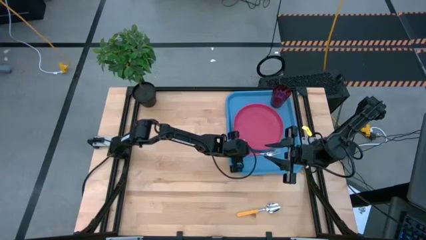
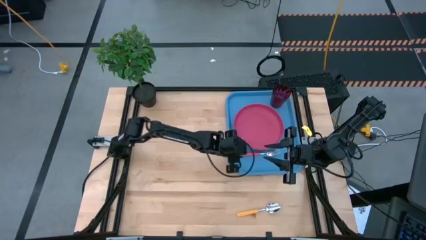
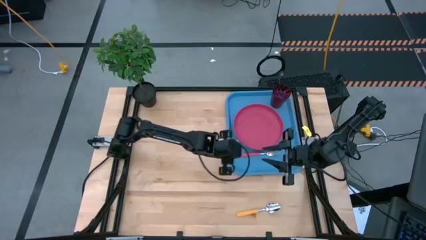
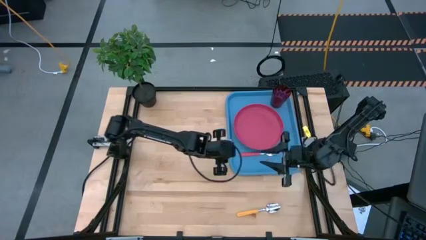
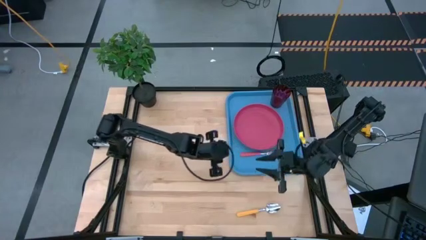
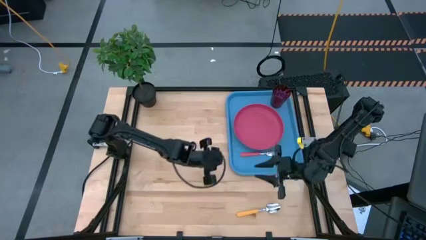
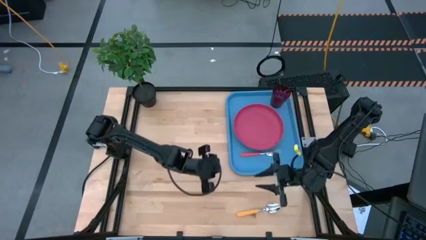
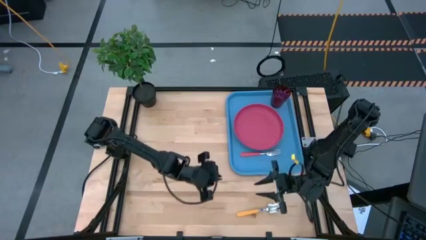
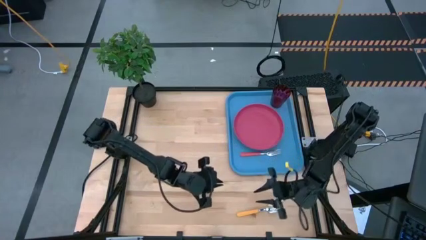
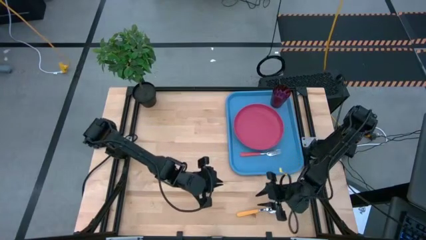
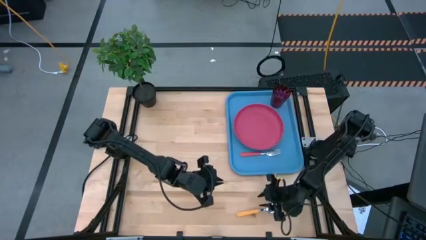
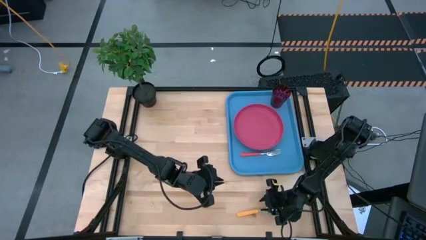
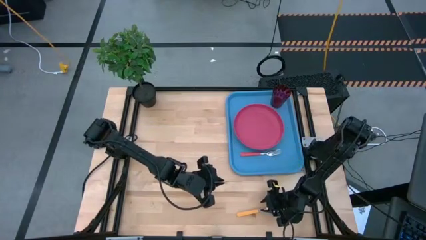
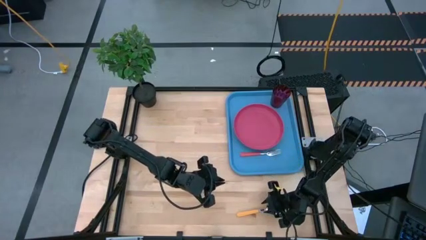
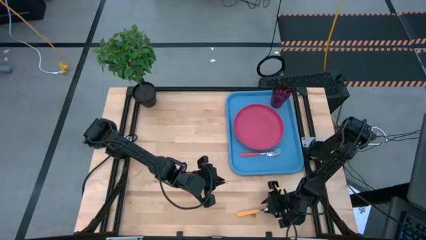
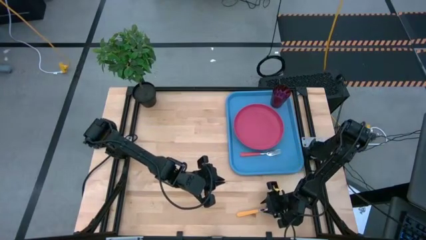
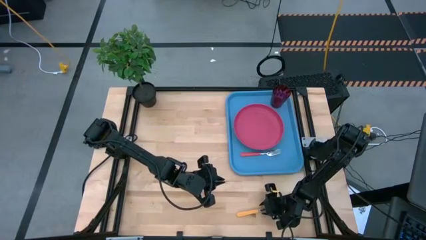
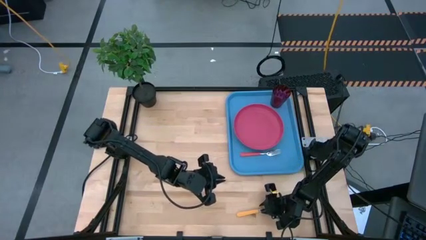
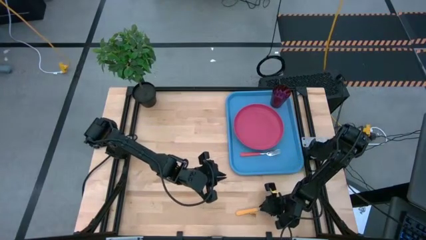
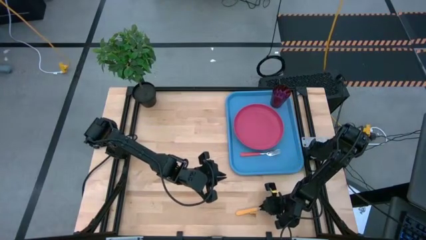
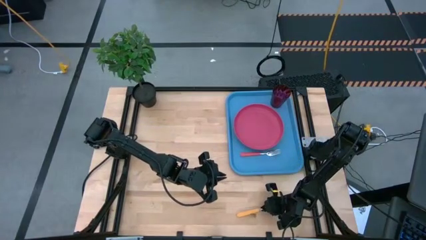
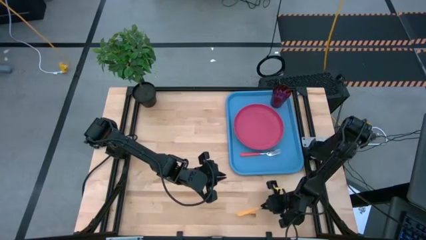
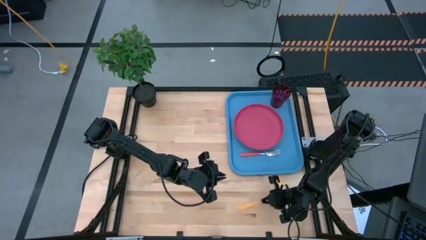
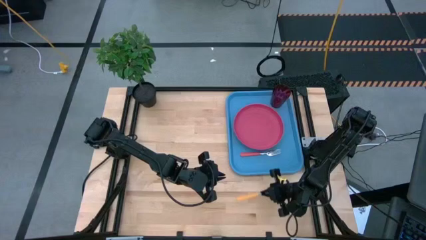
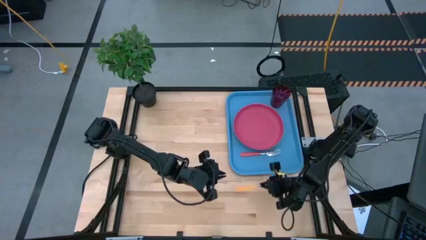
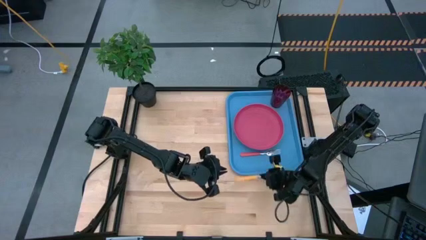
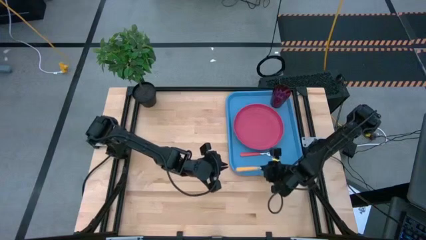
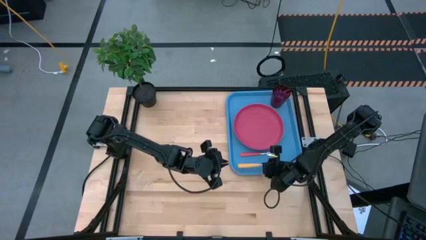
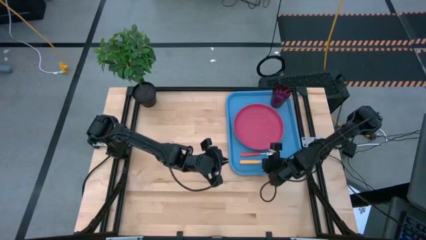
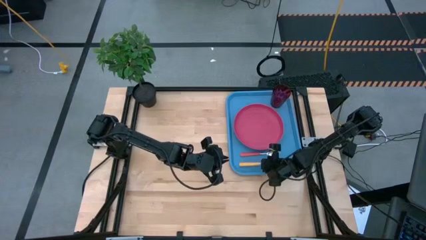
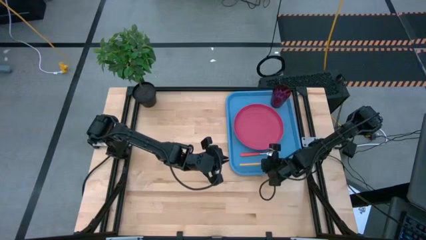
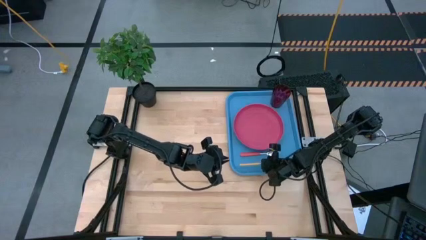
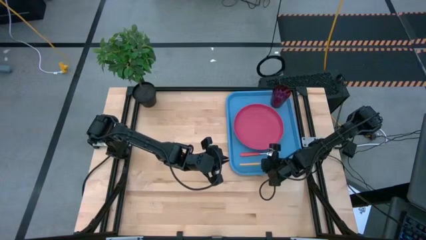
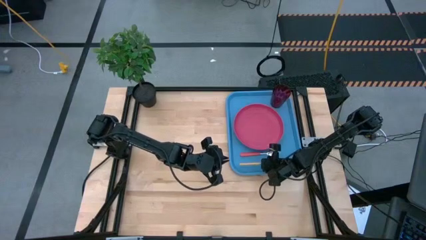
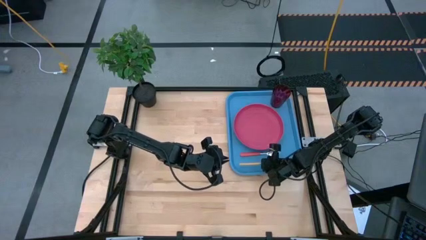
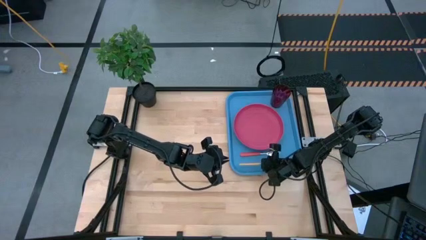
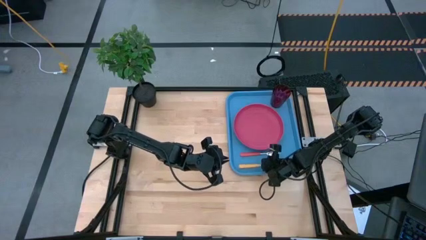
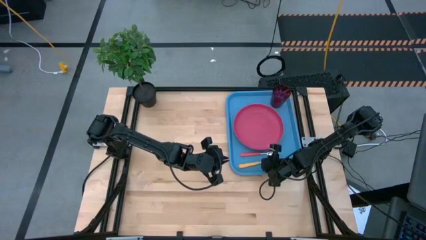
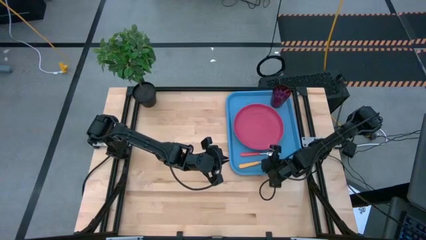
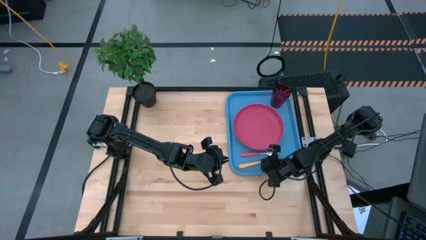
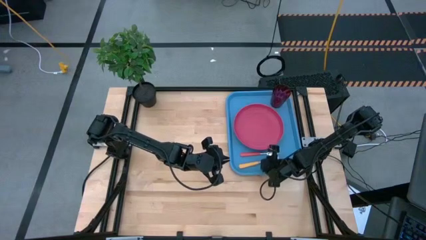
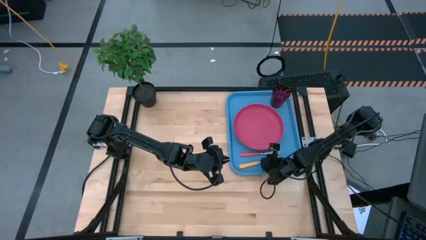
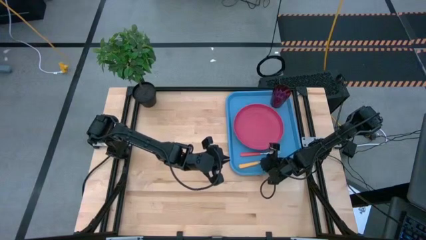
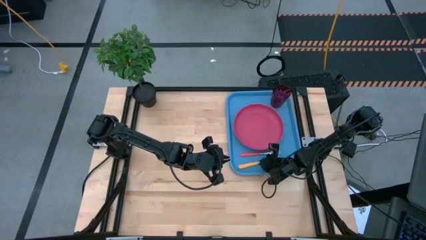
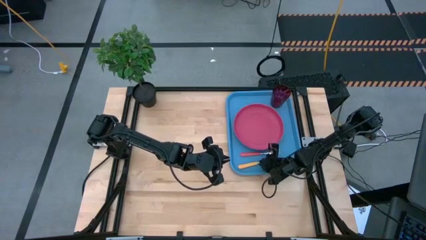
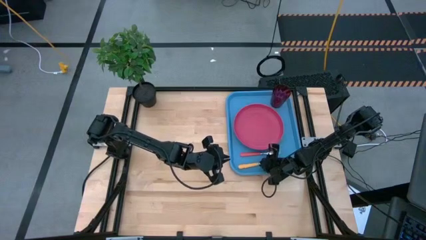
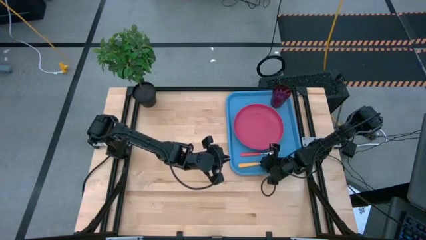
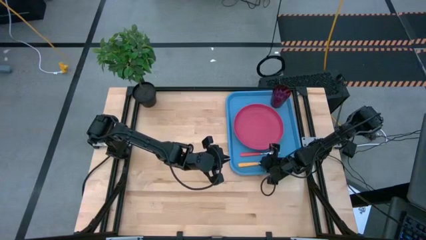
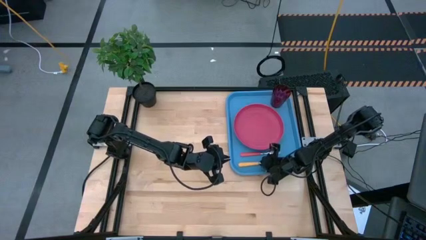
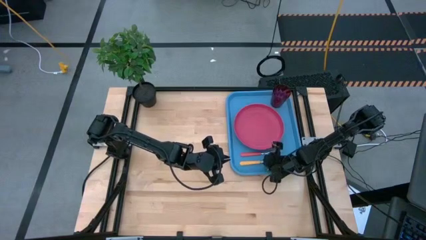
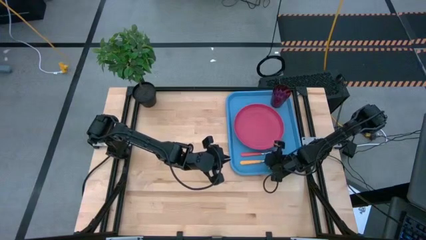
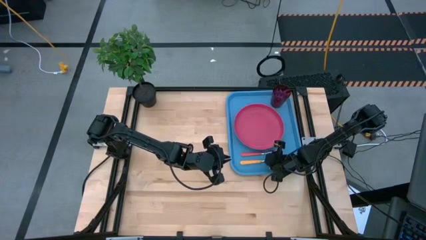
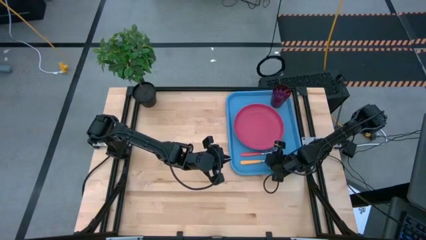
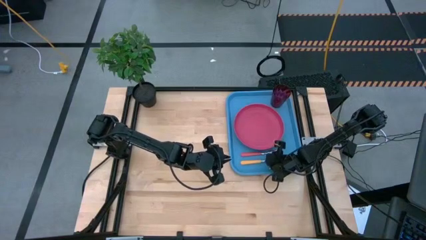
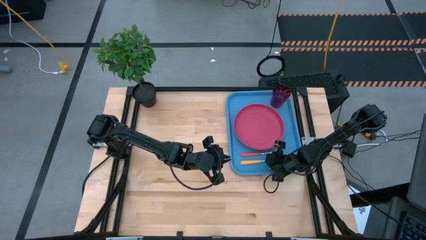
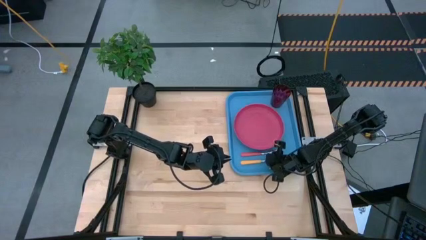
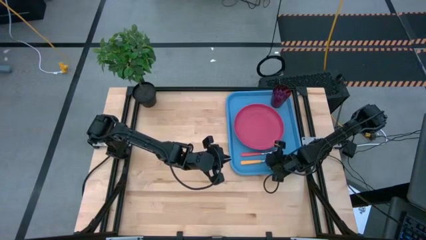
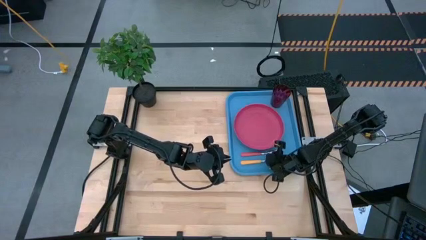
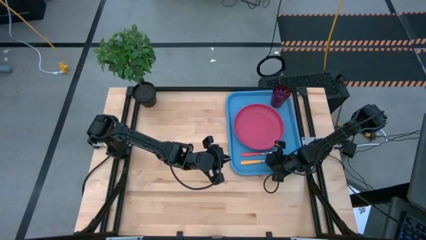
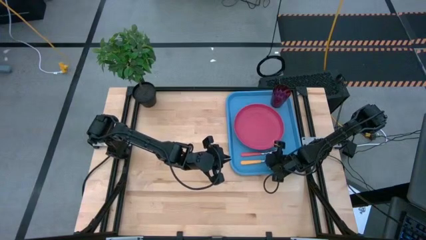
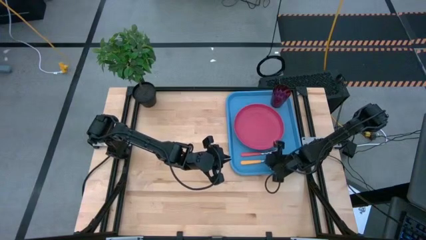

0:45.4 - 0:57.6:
Task: Pick and place plate/cup/fork/spoon on tray
Put the yellow spoon on the blue tray

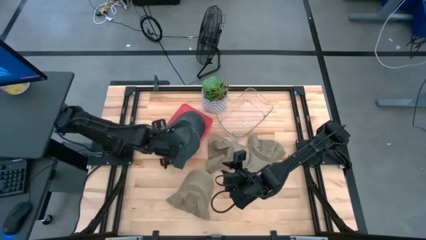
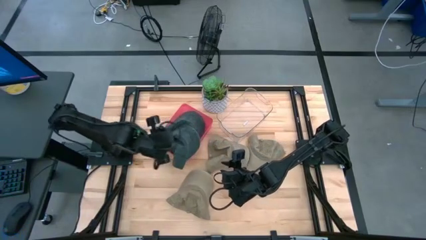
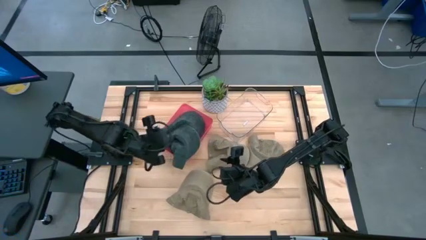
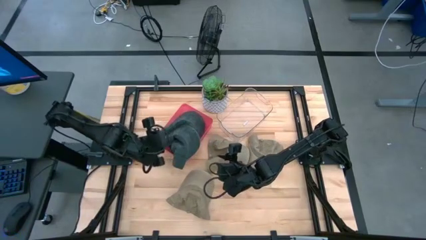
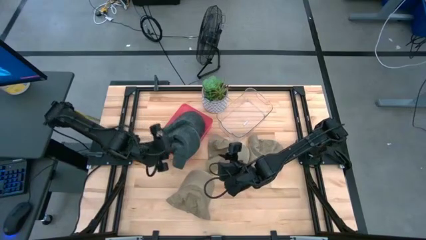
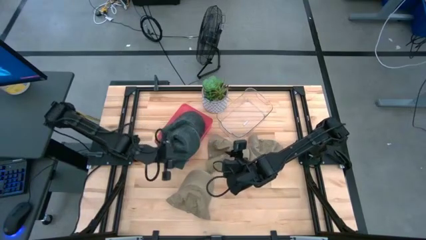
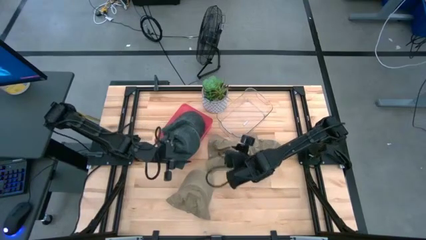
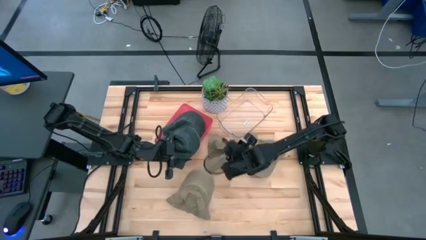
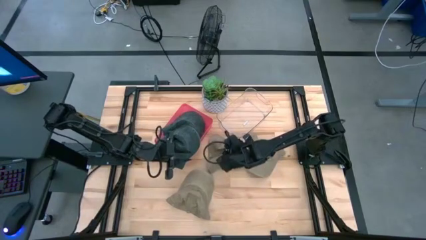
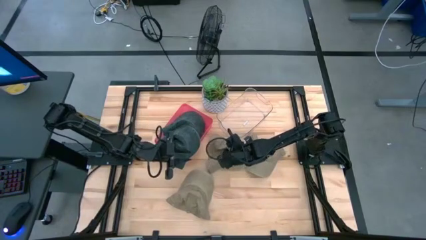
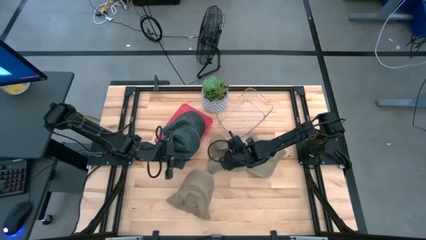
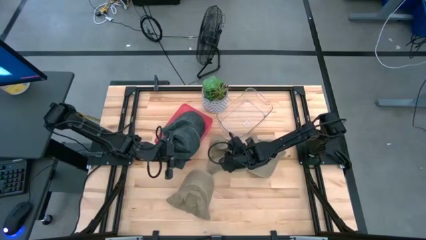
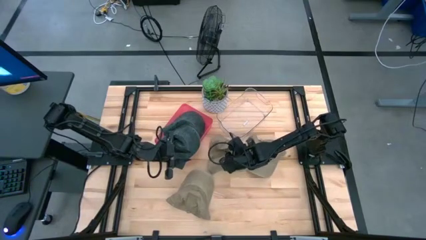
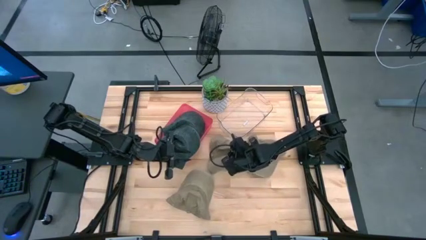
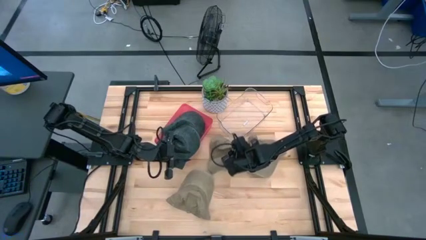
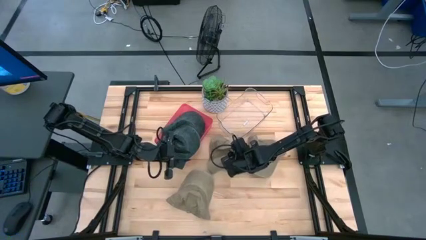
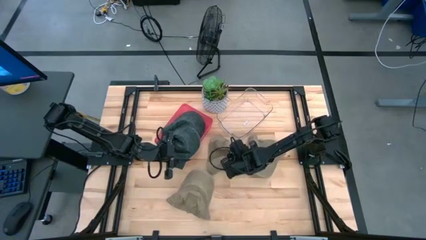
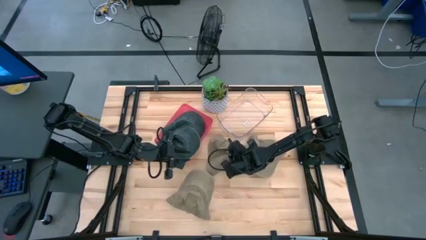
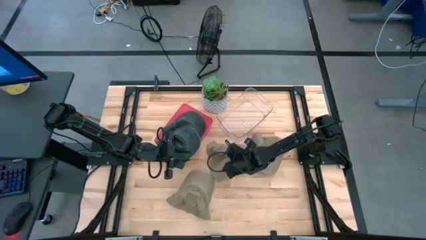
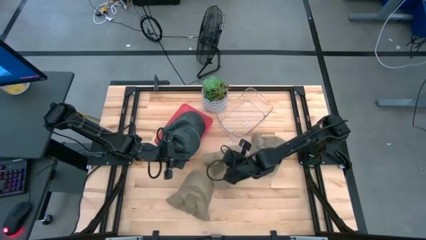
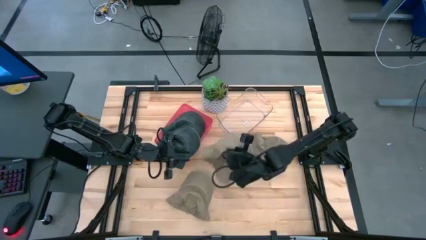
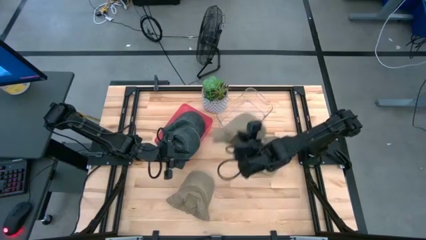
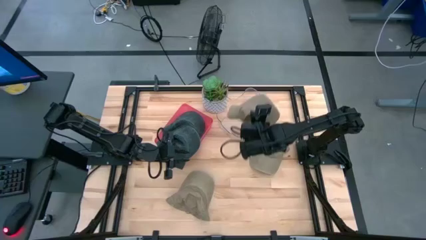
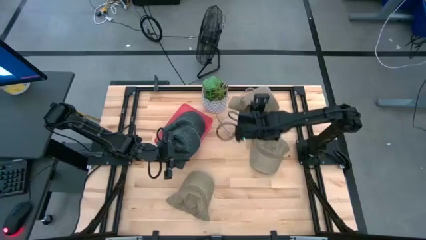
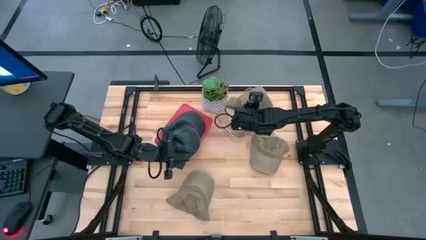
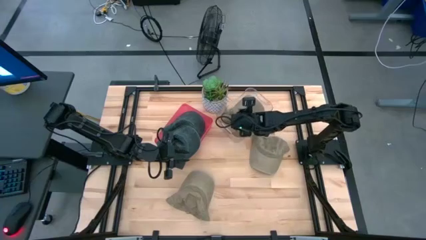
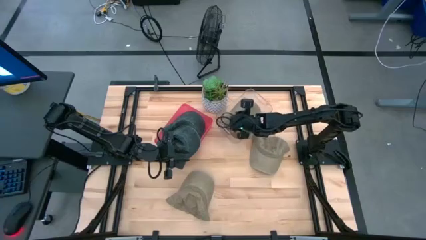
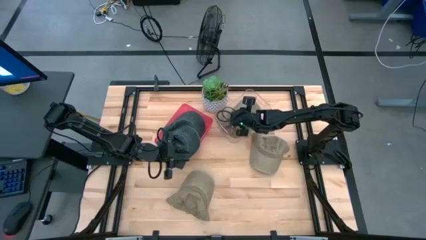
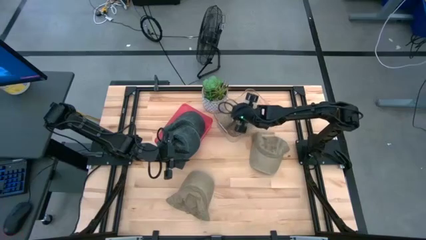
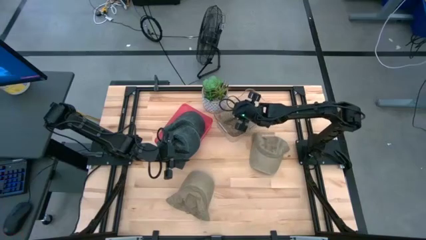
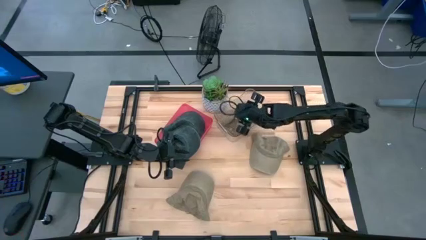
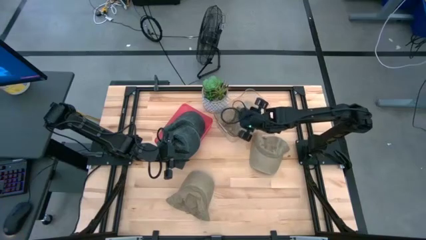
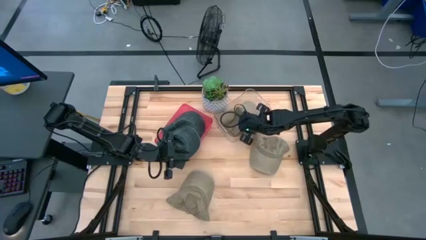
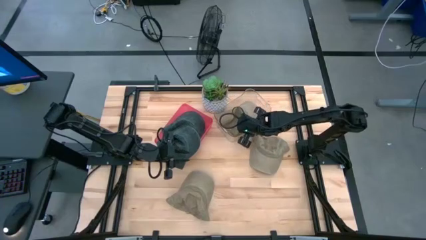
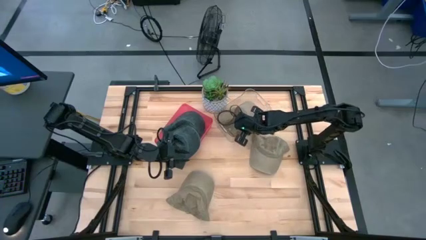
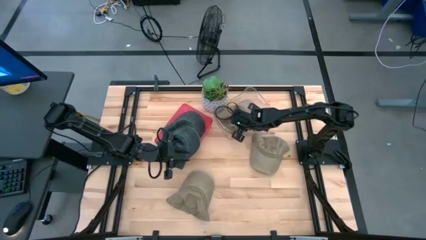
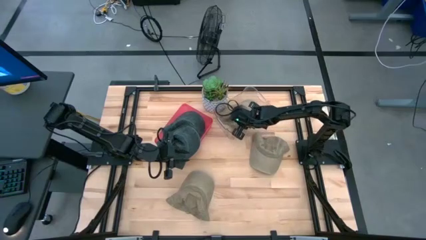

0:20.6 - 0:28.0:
Task: Pick & Place hat
Put the top left brown cap into the transparent bin
